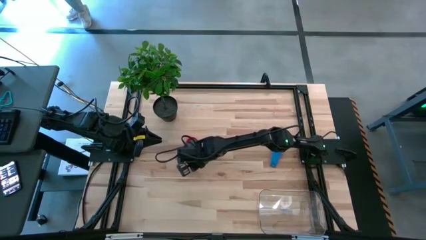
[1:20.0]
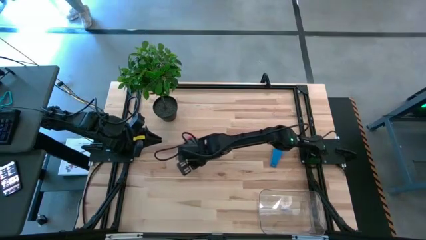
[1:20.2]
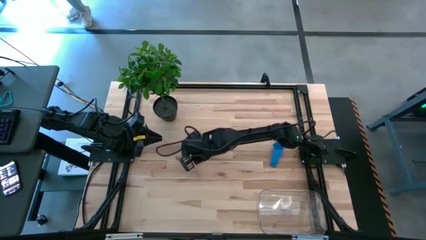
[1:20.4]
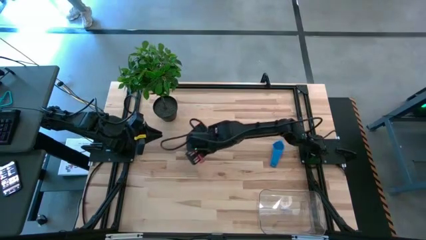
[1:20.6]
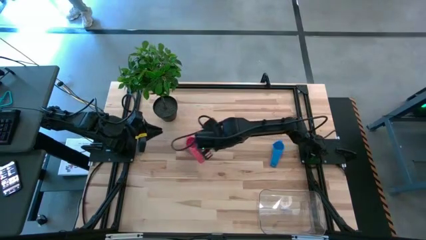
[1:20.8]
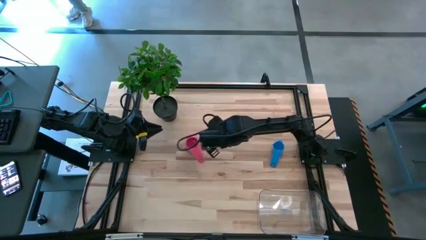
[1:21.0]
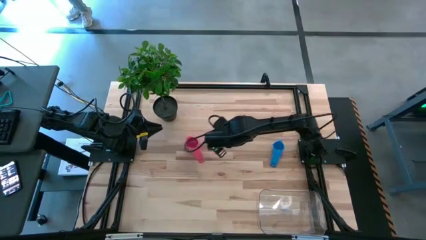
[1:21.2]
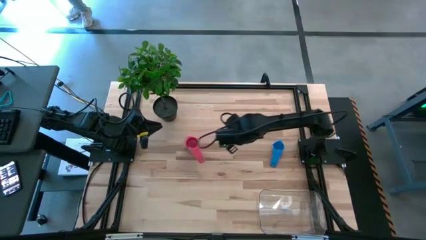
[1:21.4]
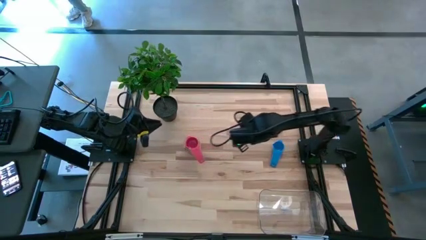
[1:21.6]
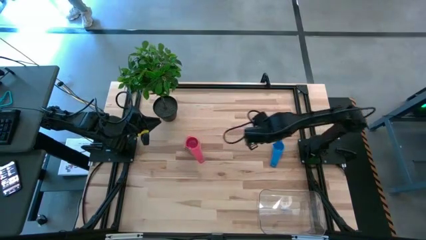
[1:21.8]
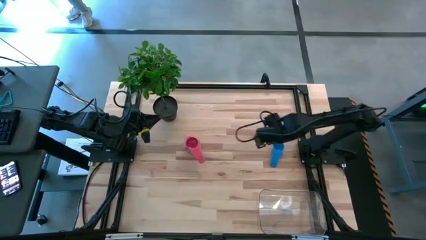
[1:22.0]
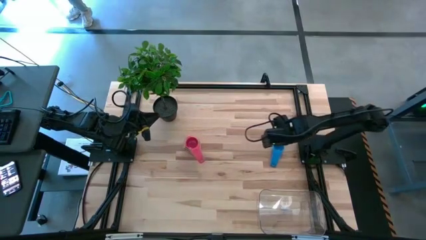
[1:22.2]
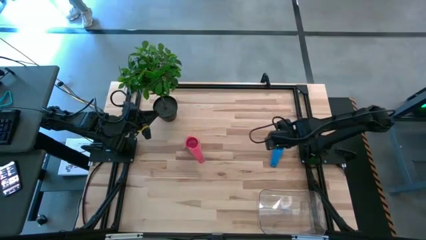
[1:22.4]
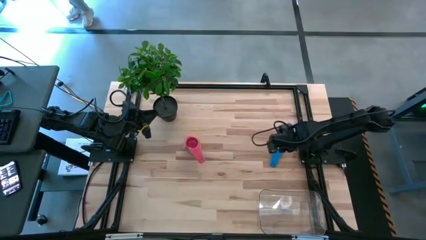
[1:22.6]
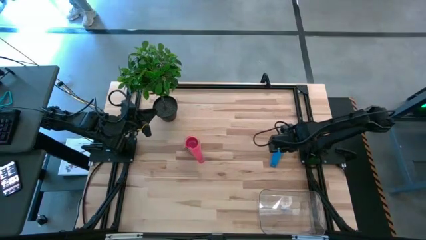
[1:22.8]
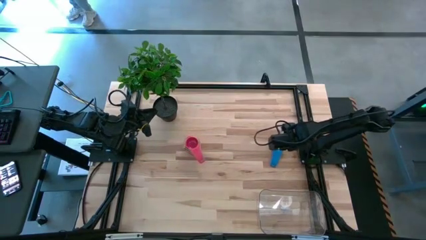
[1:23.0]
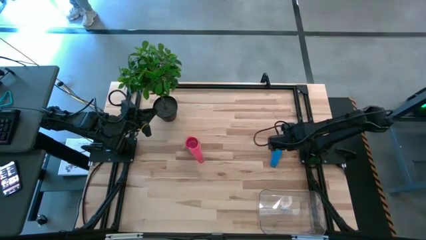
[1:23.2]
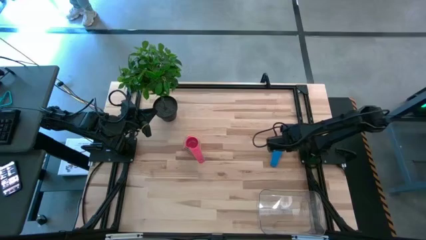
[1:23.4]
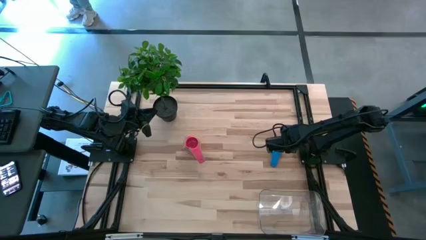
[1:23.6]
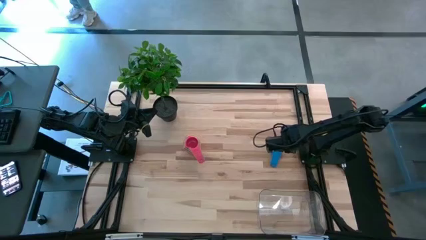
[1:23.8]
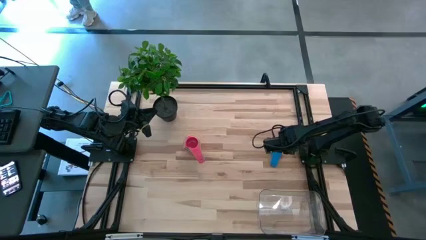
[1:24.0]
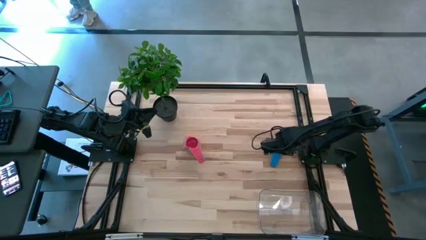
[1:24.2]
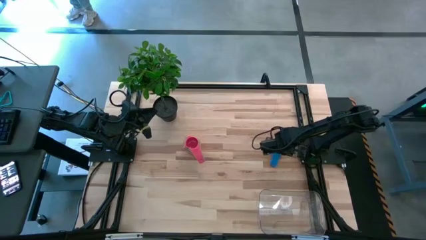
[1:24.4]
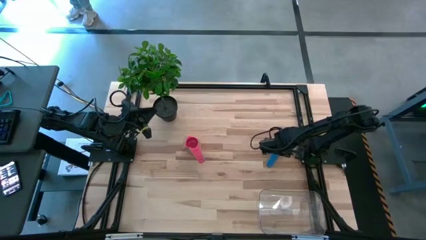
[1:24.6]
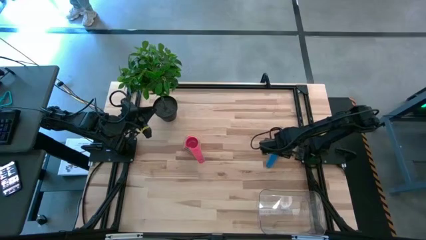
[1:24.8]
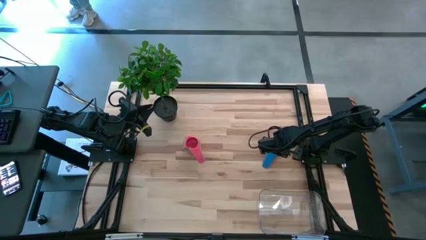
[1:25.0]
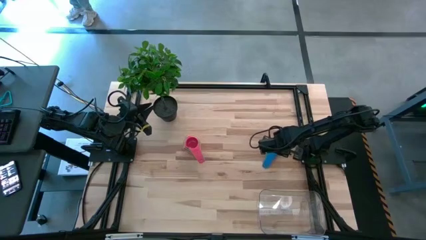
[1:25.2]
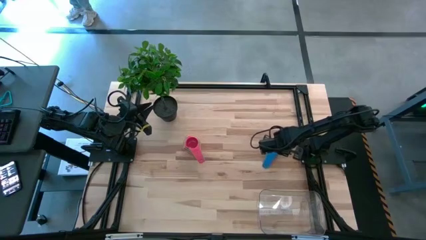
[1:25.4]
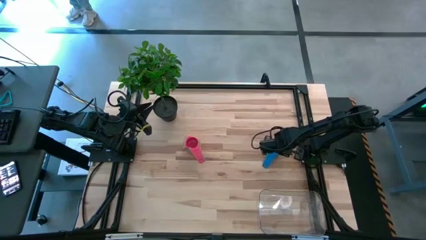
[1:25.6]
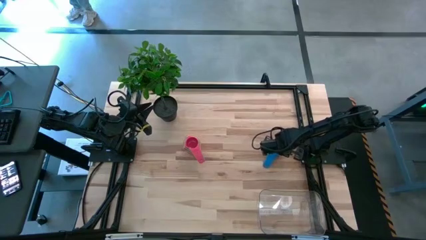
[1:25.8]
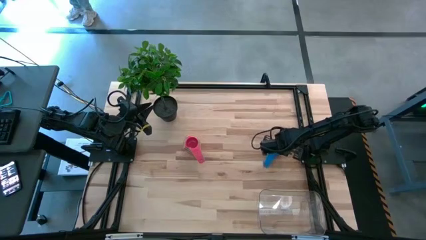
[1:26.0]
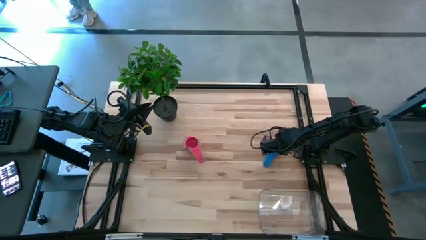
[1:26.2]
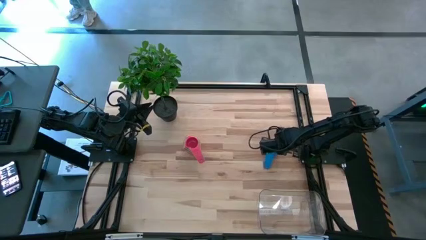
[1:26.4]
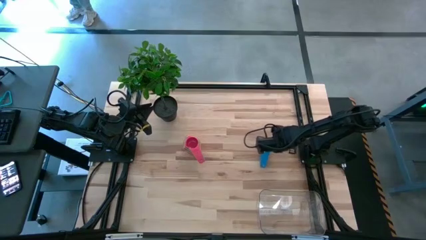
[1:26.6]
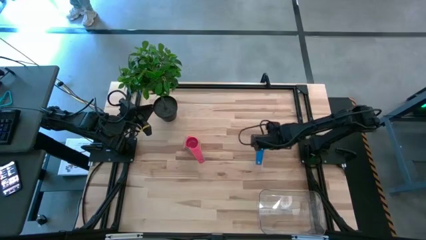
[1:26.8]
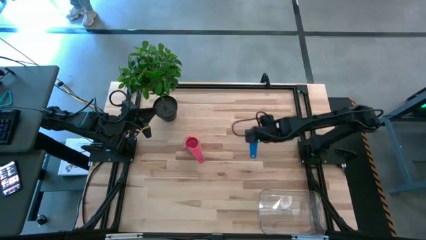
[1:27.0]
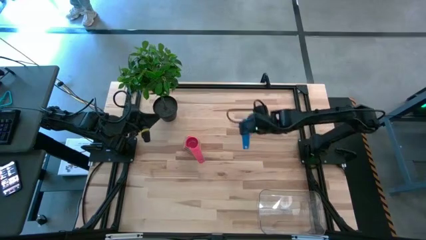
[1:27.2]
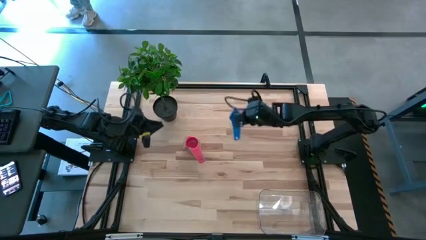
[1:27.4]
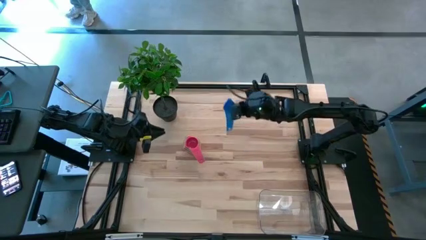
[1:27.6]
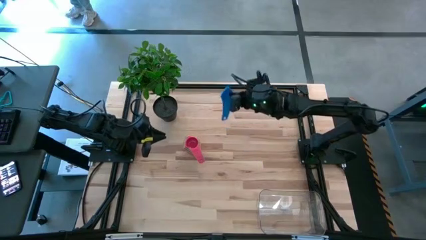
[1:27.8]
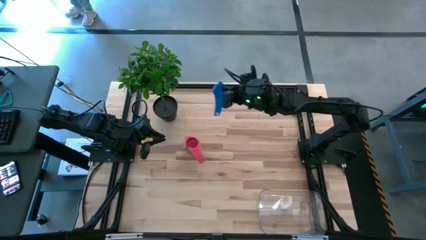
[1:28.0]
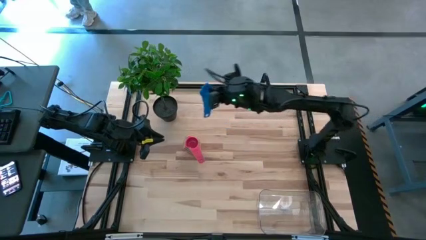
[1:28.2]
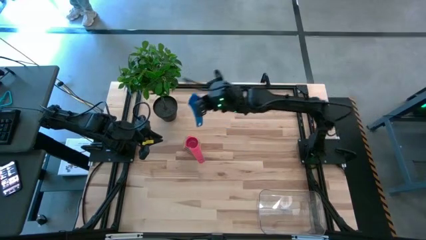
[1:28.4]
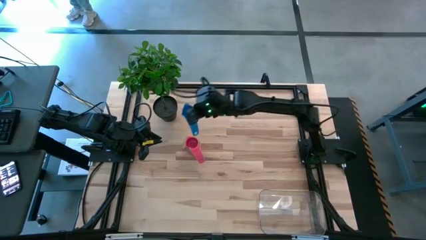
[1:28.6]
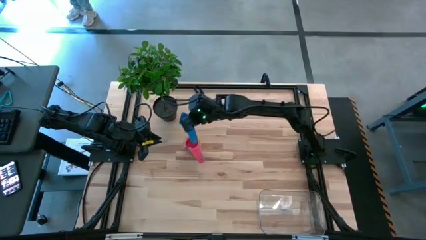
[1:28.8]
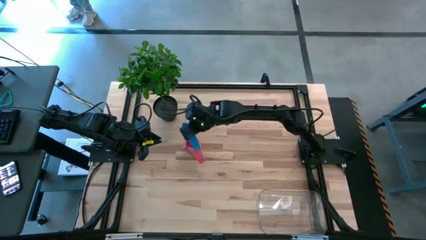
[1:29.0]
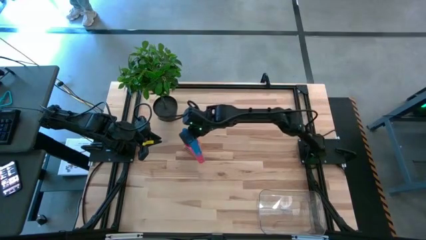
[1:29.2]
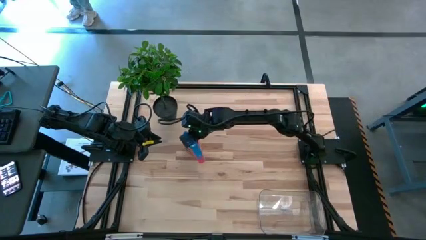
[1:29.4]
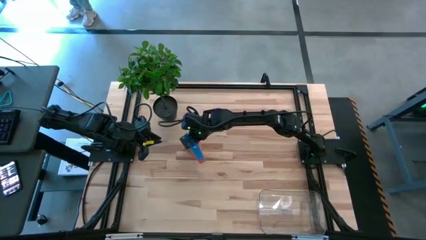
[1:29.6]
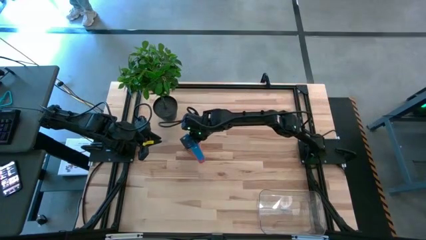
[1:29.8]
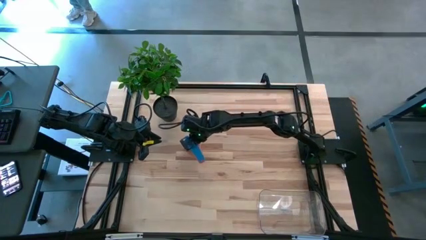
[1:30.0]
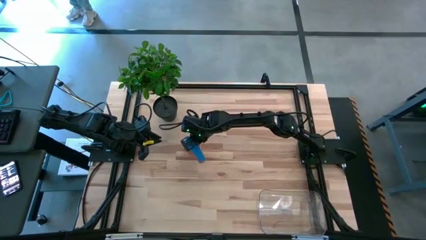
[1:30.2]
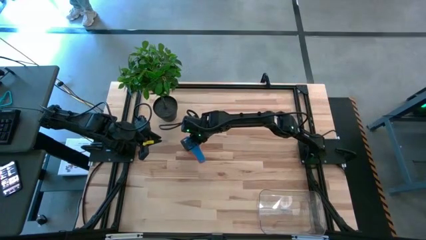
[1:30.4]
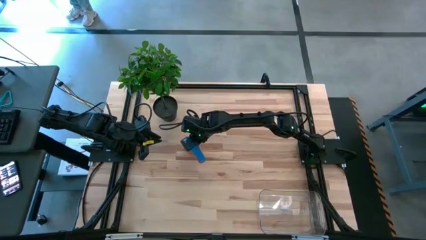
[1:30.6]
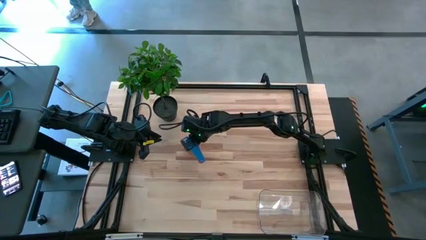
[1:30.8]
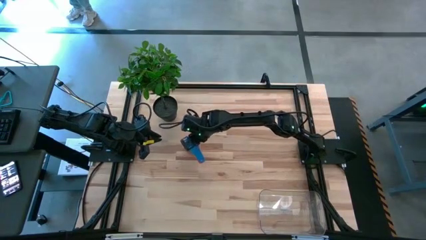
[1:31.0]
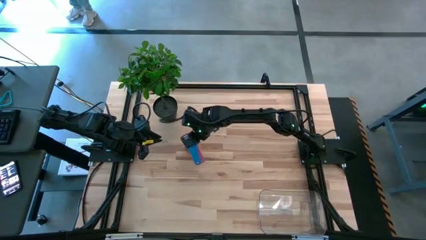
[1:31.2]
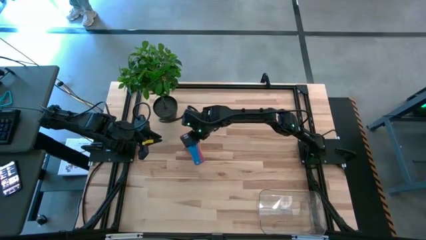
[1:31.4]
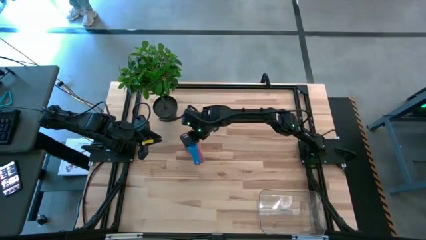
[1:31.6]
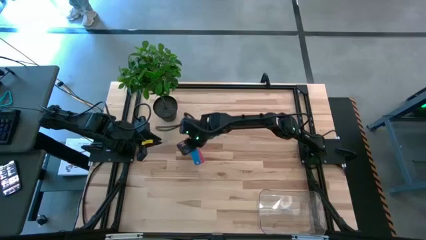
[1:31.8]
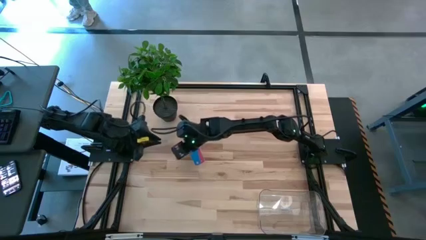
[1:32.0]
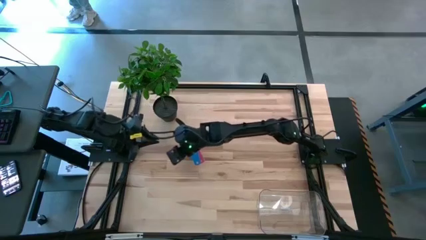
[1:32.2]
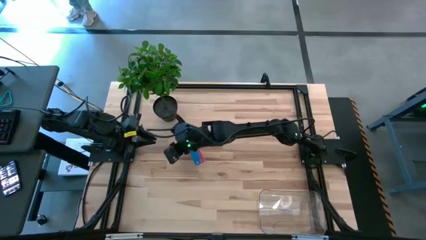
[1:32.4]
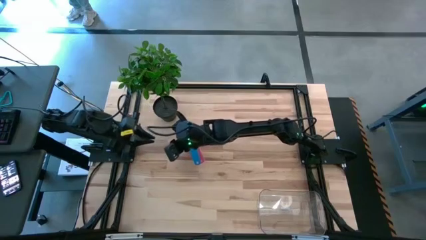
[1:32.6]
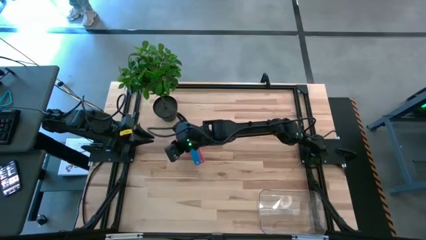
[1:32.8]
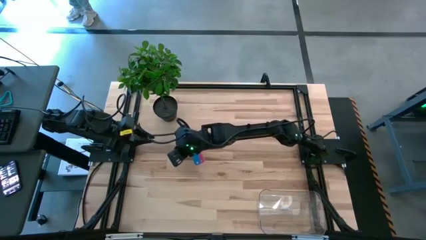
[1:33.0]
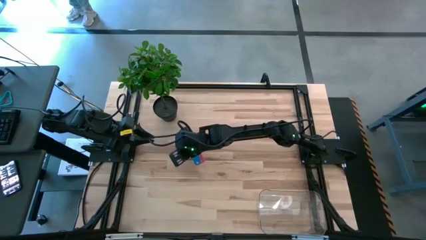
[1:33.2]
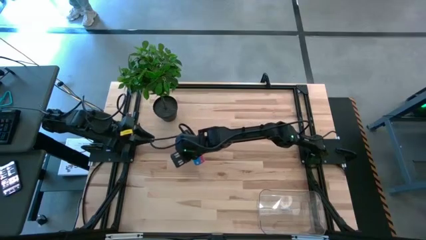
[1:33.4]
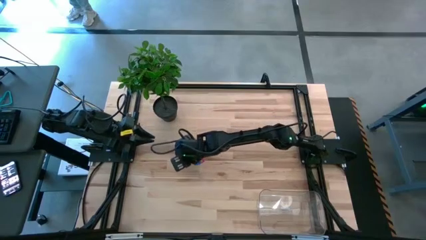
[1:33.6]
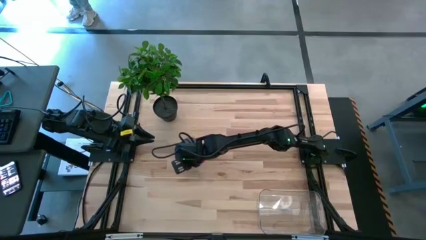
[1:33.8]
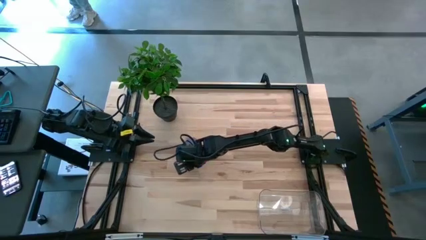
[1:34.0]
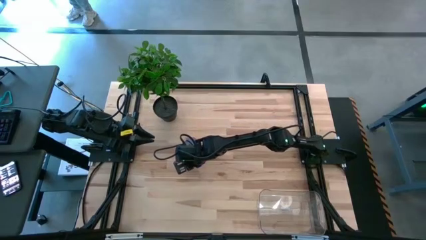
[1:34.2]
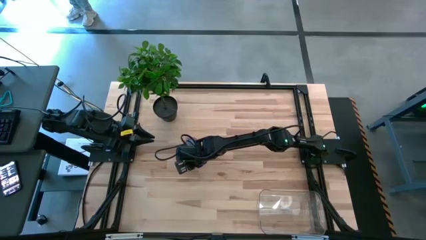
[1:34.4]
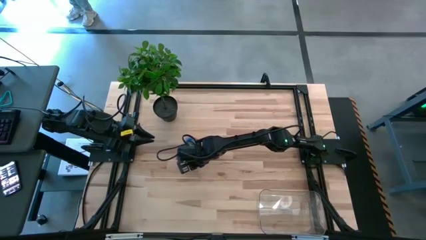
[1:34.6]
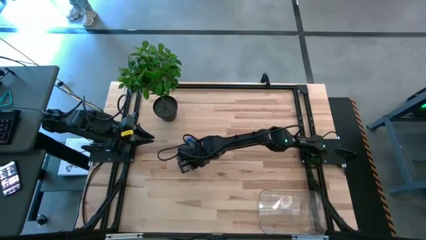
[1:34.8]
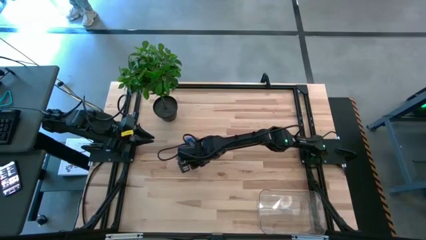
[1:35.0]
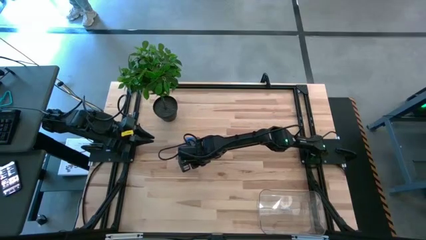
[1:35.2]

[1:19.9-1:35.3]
Task: Nest measuring cups in basket
Stack the blue measuring cup on the pink measuring cup
